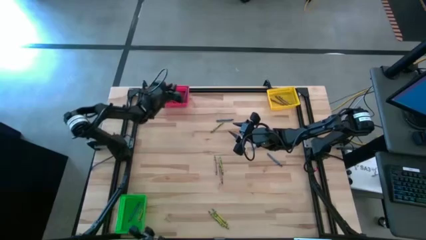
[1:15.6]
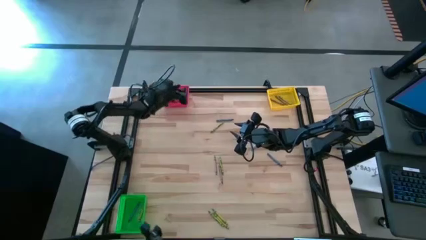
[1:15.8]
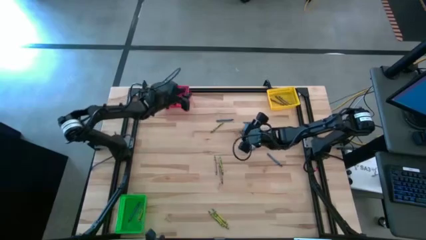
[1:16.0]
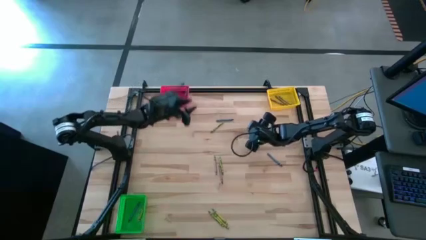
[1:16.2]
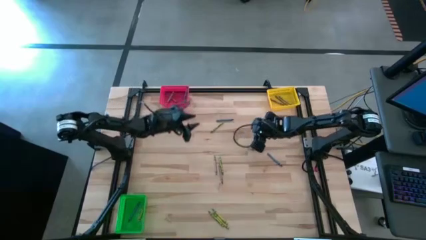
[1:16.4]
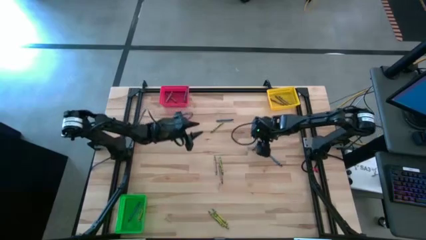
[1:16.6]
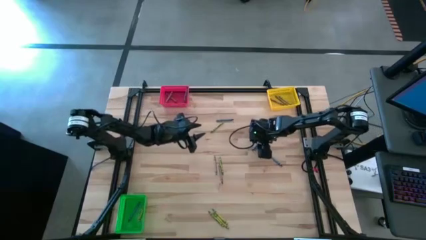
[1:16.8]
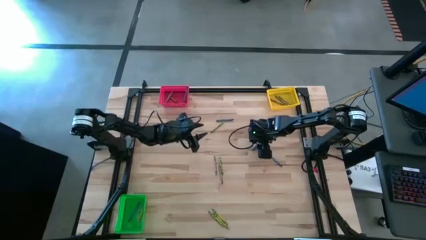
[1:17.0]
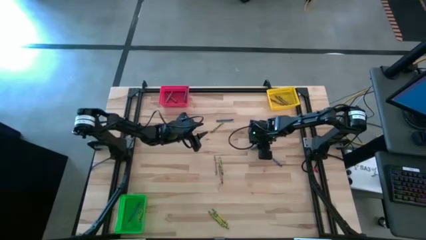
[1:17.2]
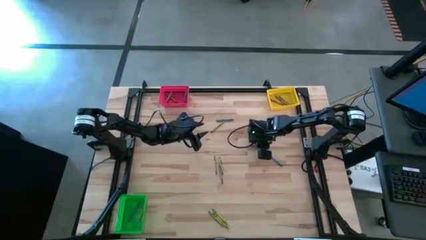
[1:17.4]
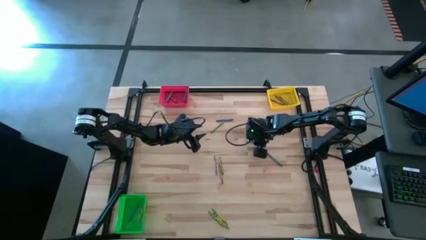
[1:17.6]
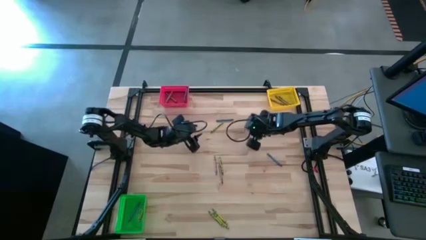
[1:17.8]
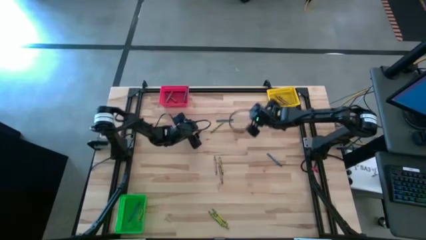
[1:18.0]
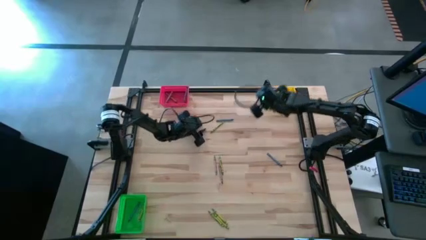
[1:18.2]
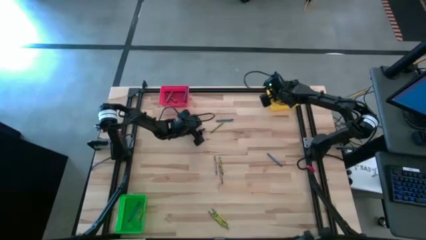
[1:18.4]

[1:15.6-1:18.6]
Task: Sort crayons
Put the blue crayon into the yellow bin

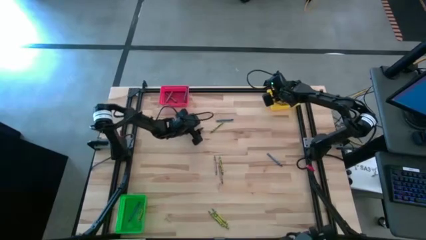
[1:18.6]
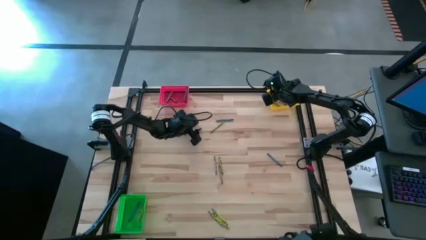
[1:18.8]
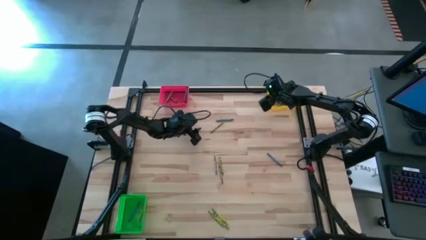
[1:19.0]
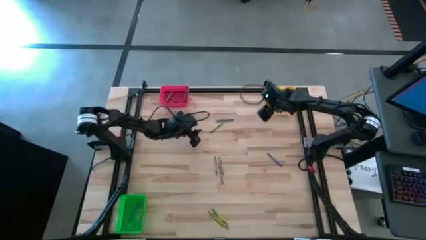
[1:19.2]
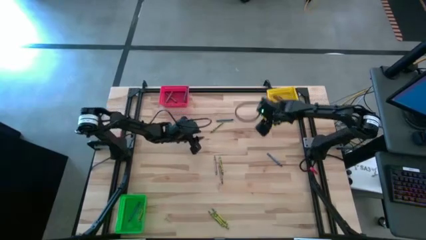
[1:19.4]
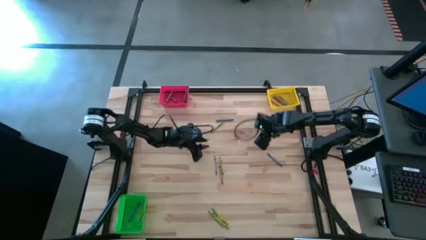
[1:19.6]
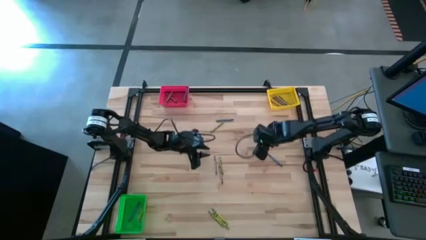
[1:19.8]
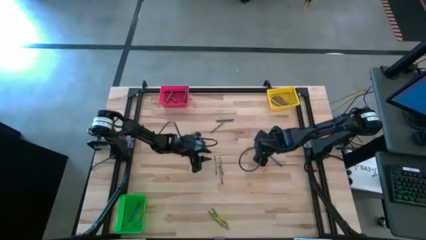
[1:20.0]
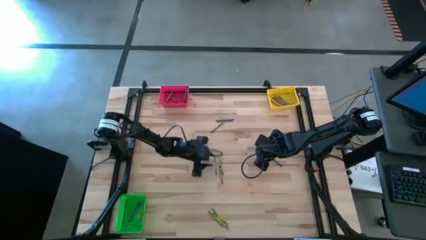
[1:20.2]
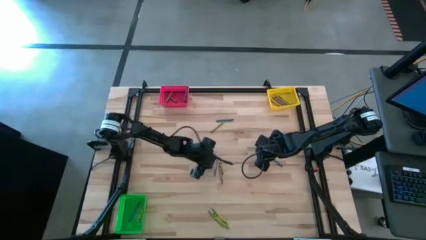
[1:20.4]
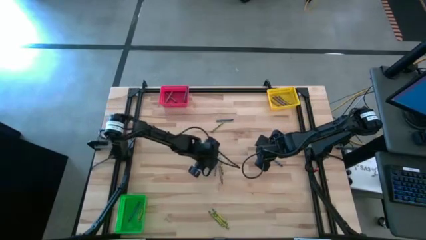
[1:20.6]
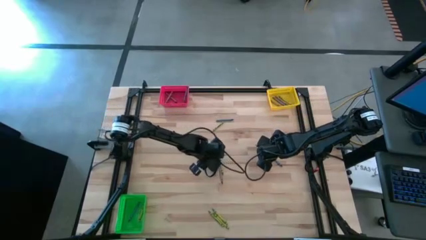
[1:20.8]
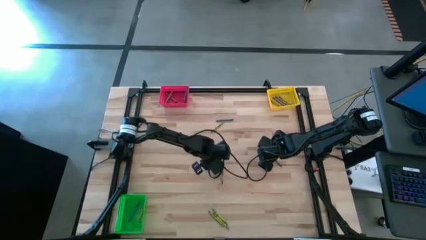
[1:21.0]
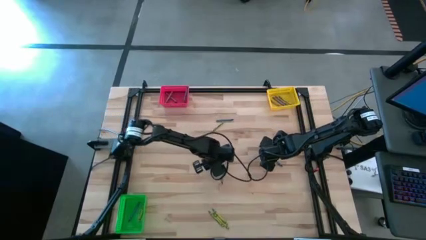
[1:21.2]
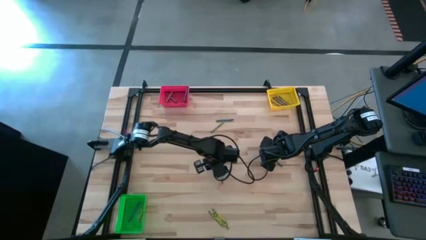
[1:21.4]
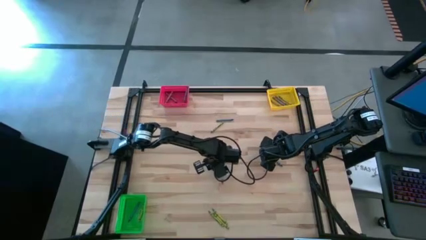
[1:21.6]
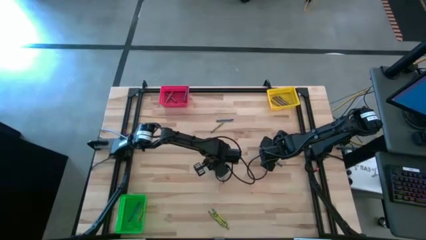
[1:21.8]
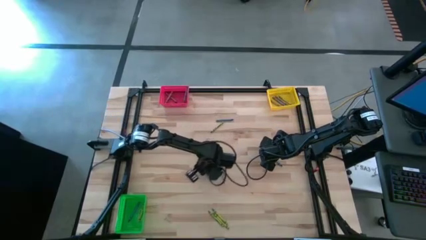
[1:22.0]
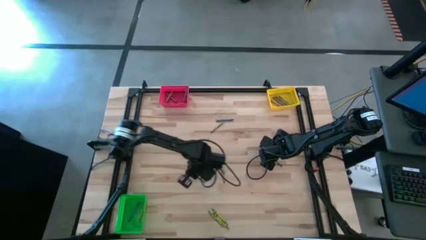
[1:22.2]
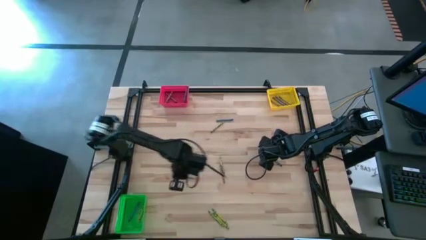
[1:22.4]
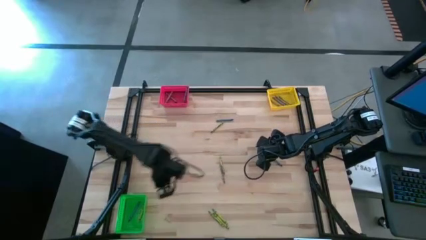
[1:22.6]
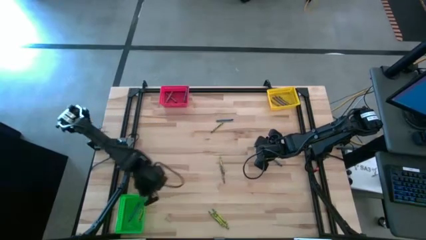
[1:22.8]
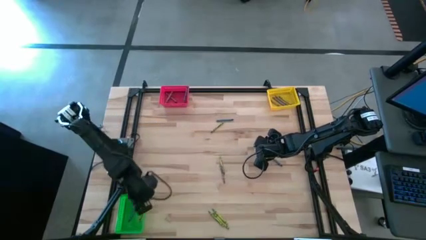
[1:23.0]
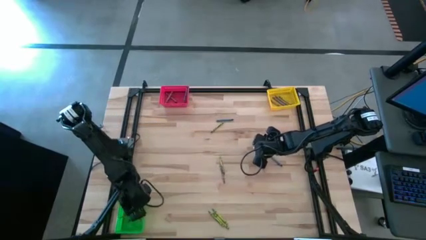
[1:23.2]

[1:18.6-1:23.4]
Put the brown crayon into the green bin

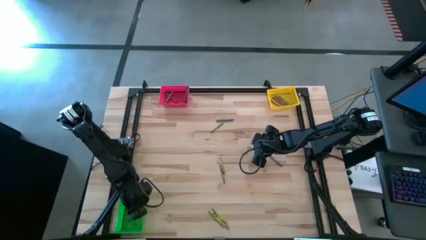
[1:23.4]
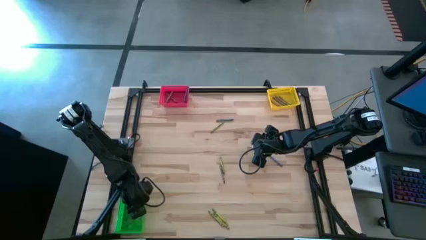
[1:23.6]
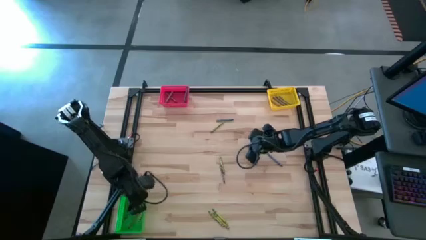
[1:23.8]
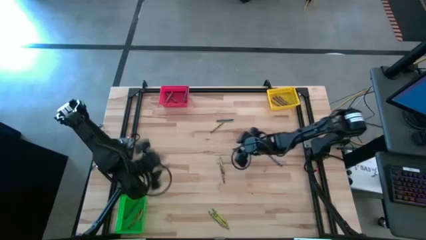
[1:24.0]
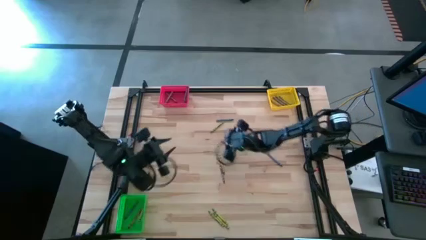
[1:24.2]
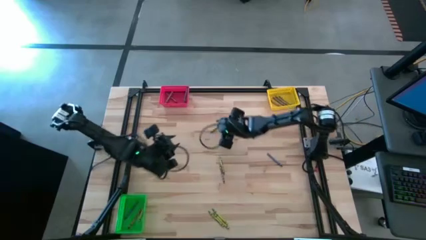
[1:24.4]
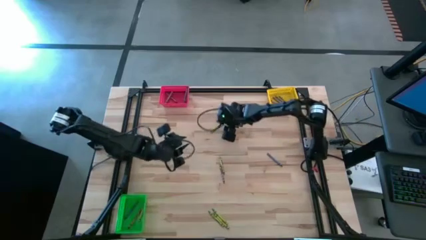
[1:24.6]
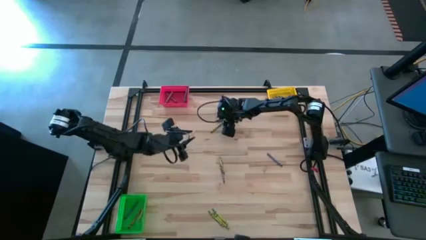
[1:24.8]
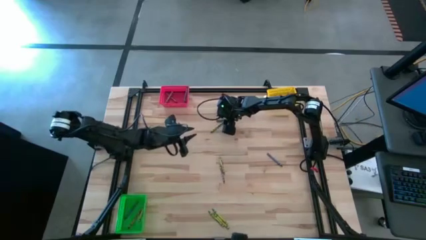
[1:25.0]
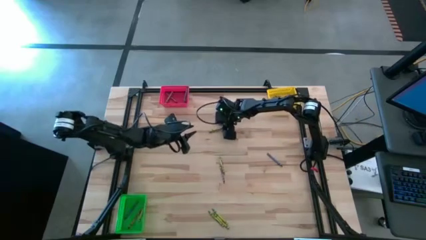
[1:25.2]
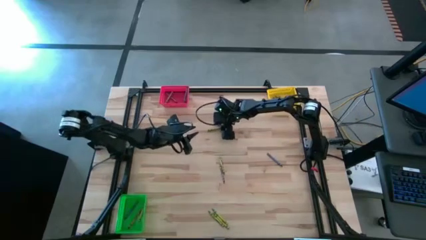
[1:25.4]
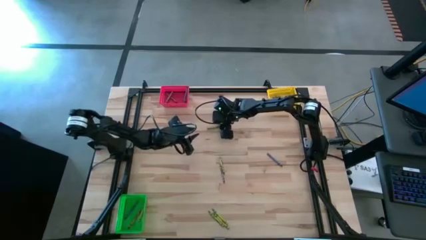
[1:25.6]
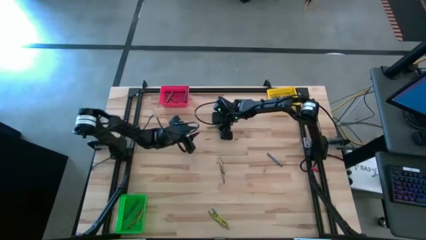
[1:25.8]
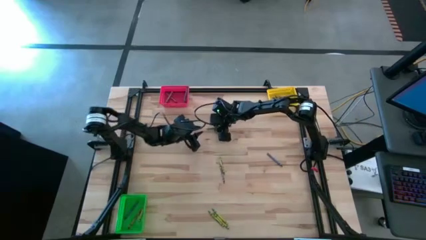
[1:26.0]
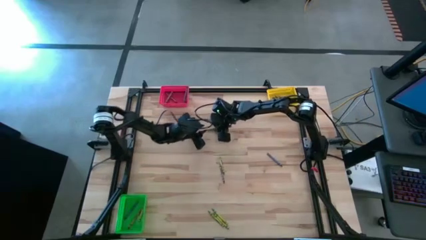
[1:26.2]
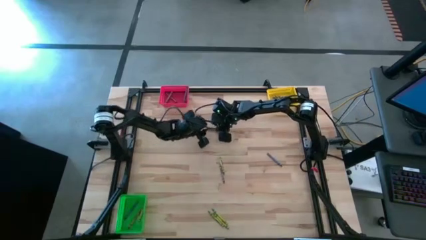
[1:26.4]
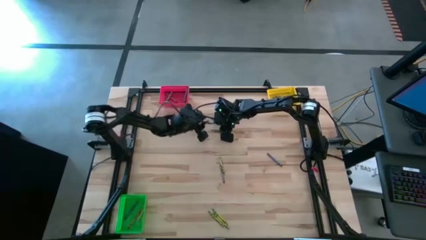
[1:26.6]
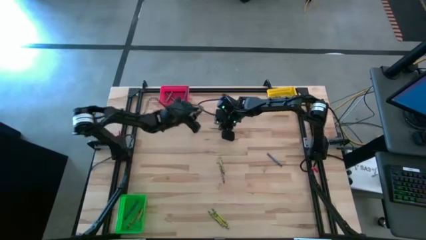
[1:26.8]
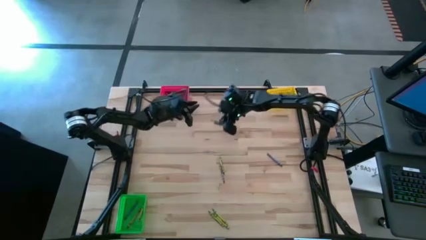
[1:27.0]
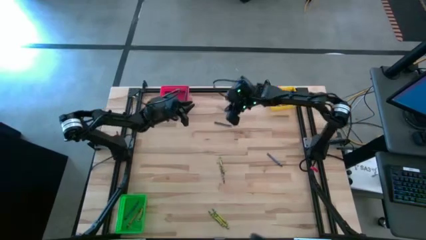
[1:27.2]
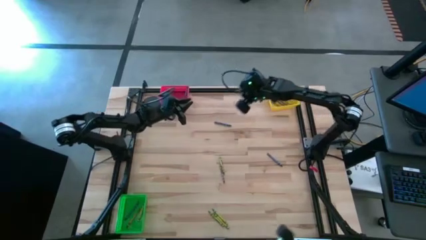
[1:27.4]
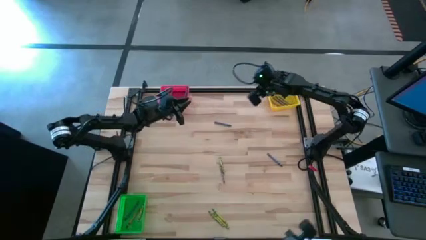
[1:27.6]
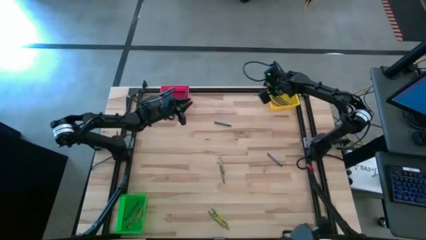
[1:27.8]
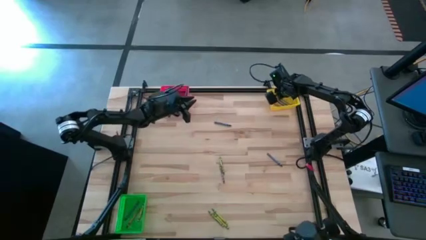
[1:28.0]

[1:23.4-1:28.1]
Put the green crayon into the yellow bin

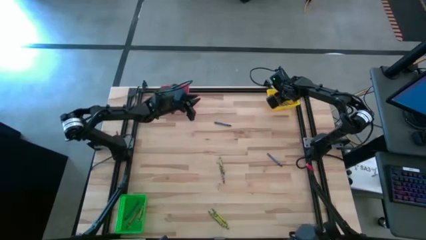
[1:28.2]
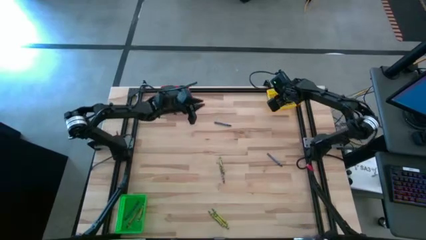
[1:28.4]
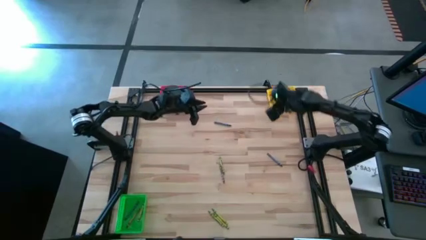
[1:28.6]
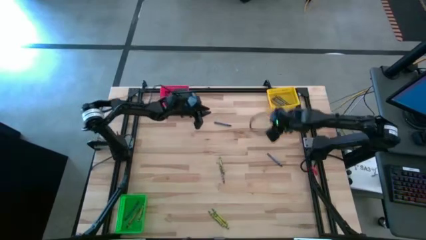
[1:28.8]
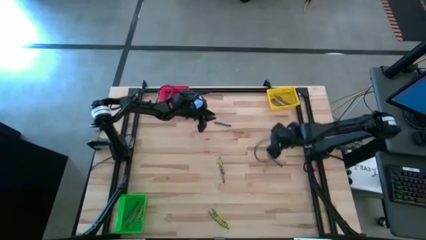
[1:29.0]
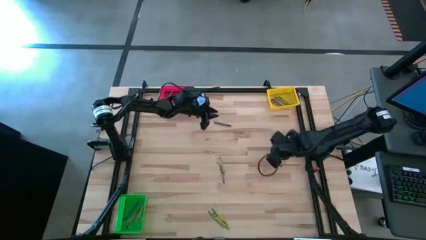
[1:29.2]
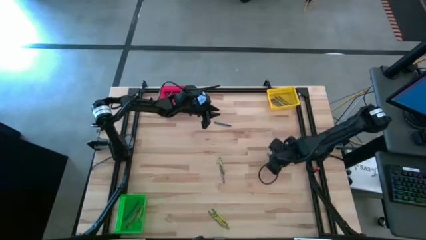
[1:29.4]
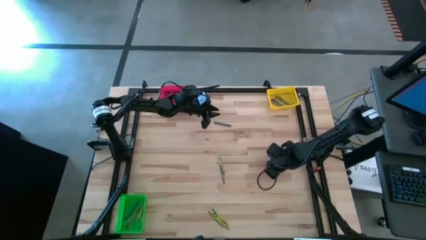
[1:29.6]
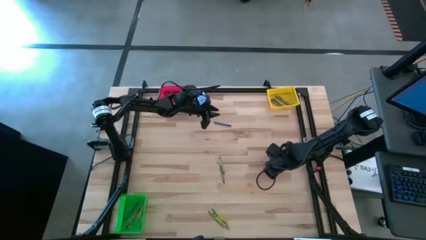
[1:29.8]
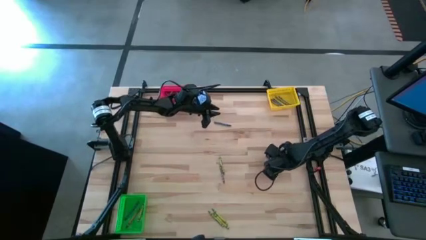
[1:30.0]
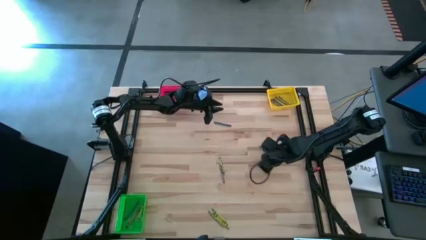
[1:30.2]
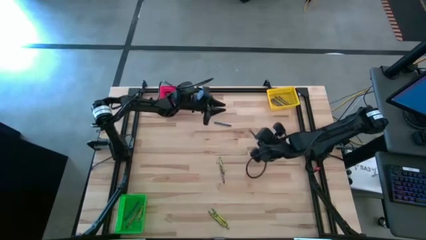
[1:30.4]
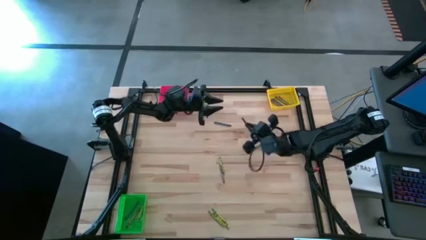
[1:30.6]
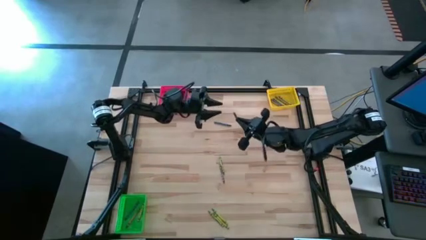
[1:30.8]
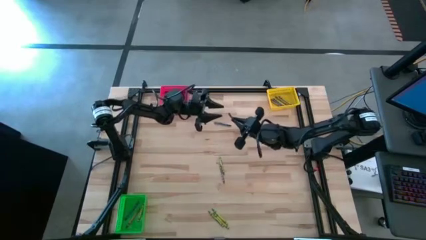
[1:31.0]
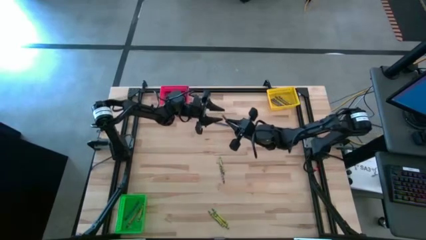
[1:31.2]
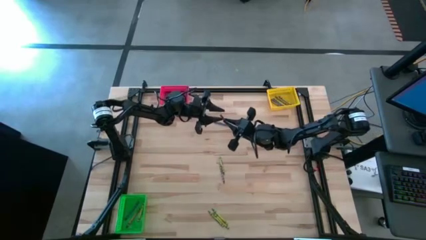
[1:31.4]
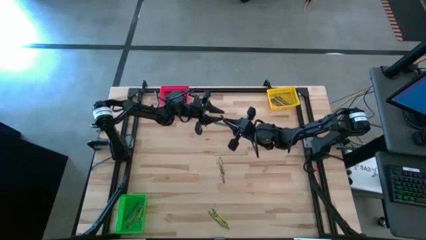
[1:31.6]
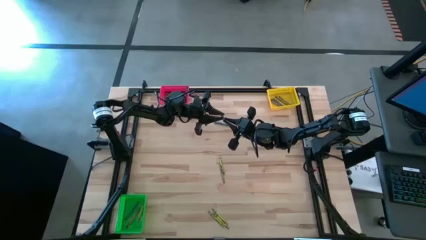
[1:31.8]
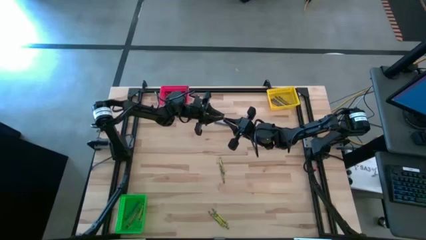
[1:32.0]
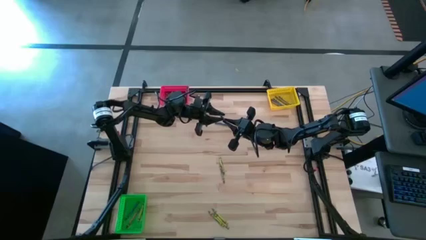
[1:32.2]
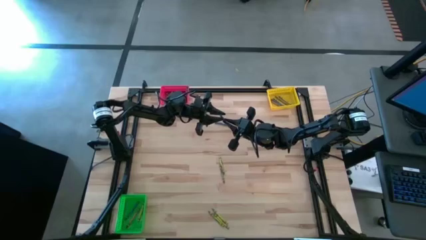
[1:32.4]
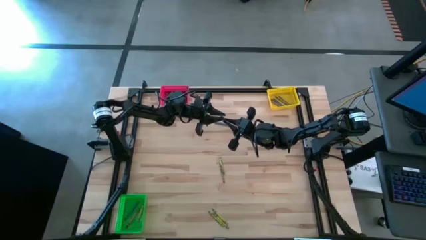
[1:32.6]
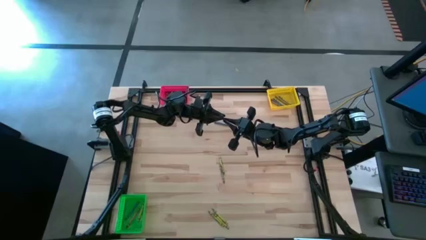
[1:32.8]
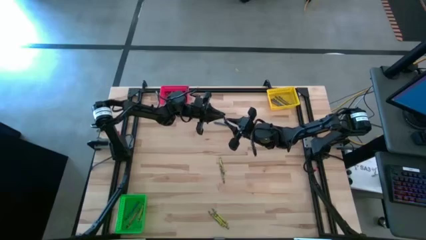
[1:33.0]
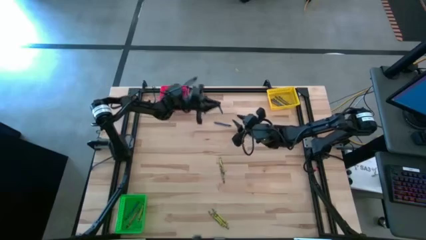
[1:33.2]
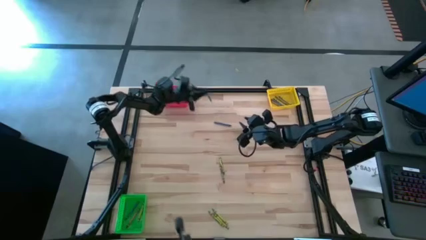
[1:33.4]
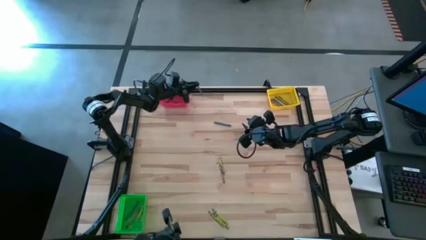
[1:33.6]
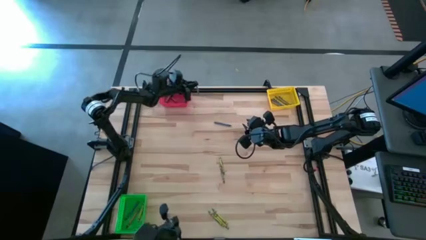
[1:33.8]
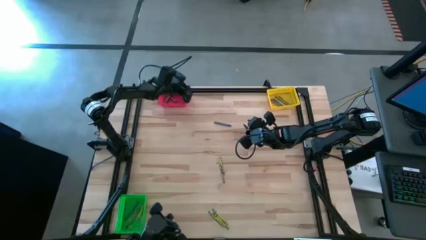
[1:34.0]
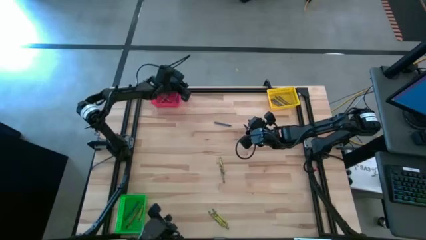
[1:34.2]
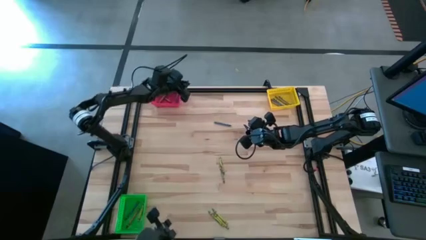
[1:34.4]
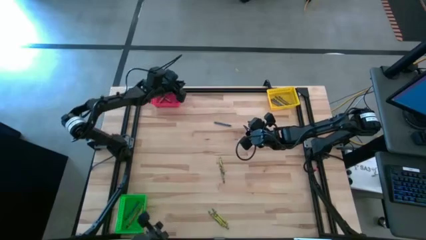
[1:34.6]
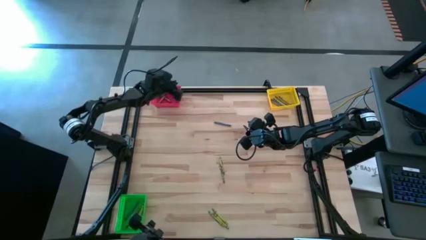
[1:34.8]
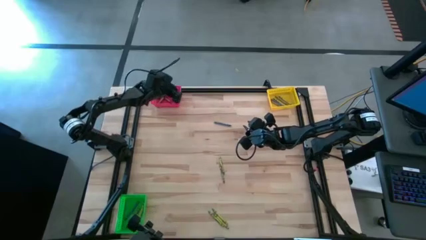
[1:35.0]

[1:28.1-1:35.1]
Put the blue crayon into the red bin
